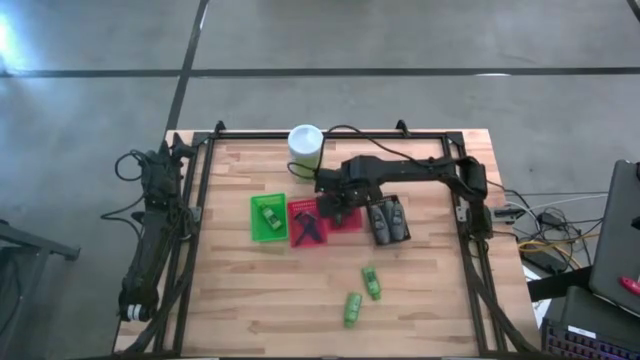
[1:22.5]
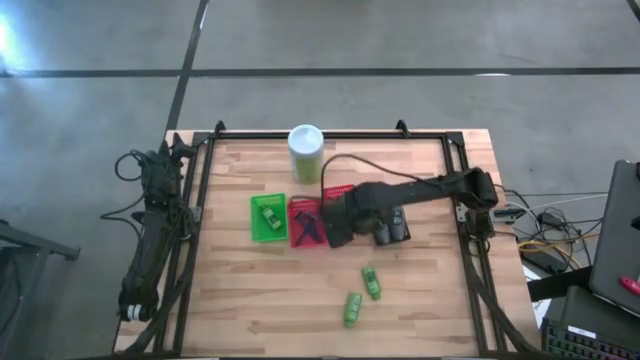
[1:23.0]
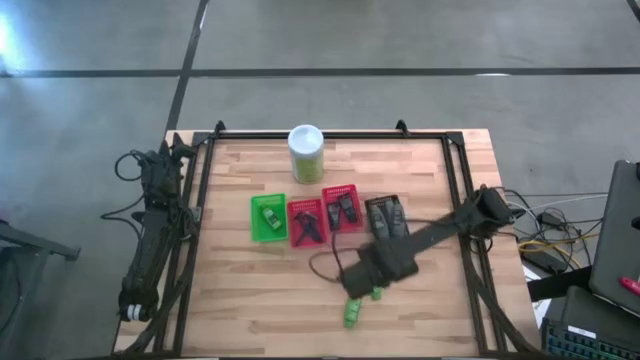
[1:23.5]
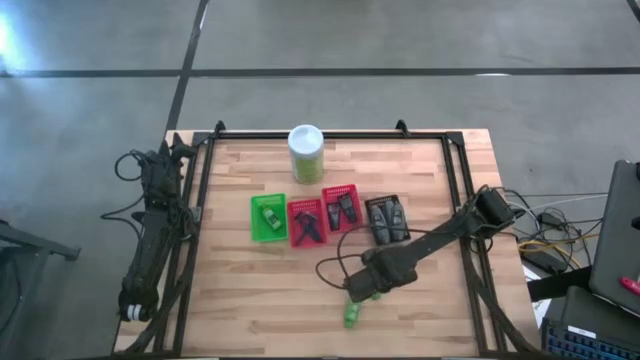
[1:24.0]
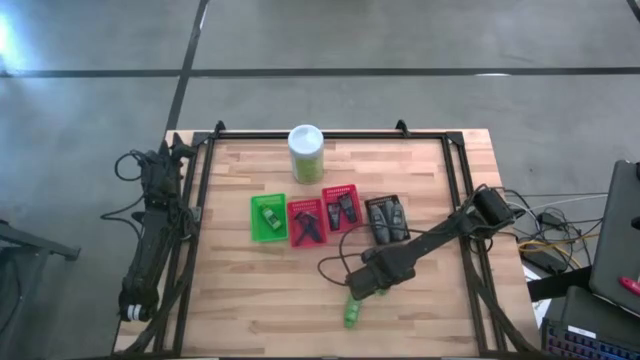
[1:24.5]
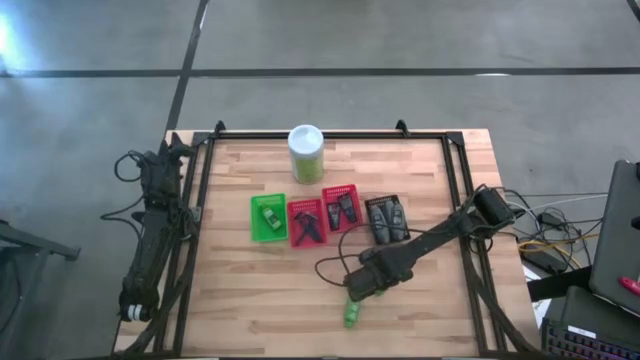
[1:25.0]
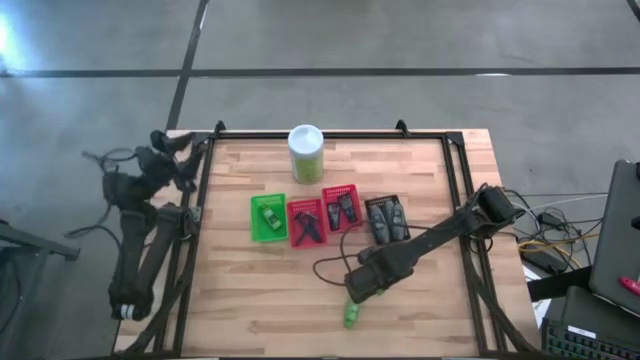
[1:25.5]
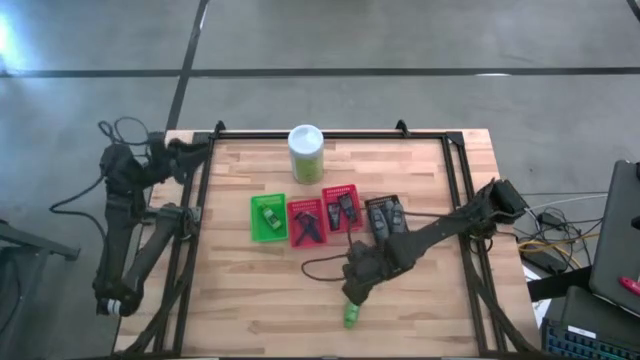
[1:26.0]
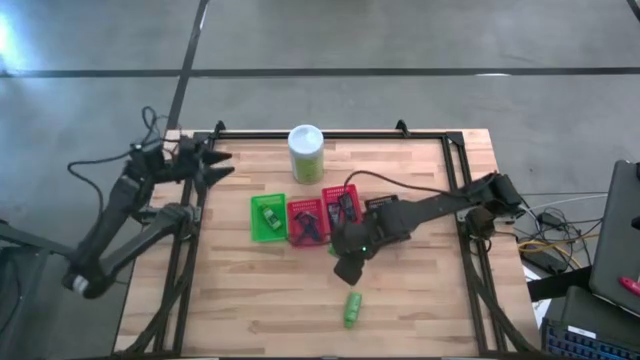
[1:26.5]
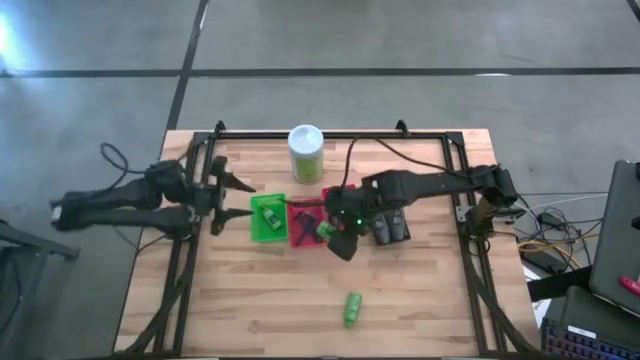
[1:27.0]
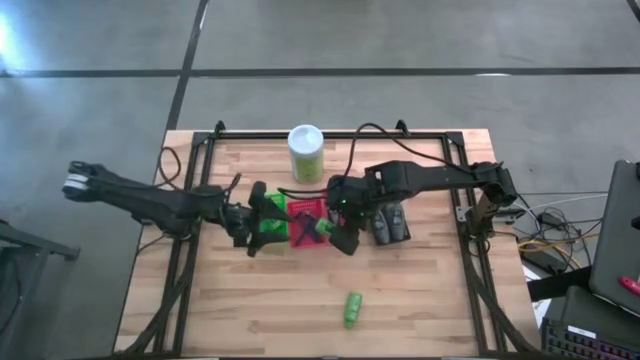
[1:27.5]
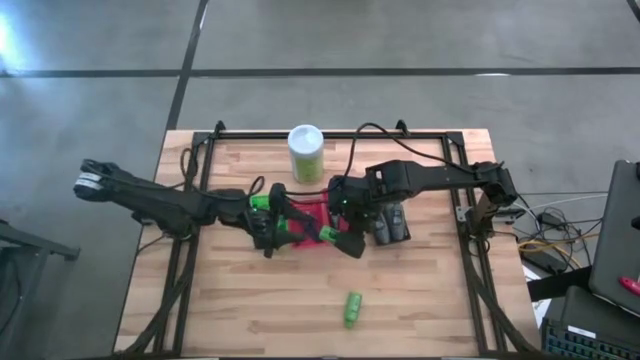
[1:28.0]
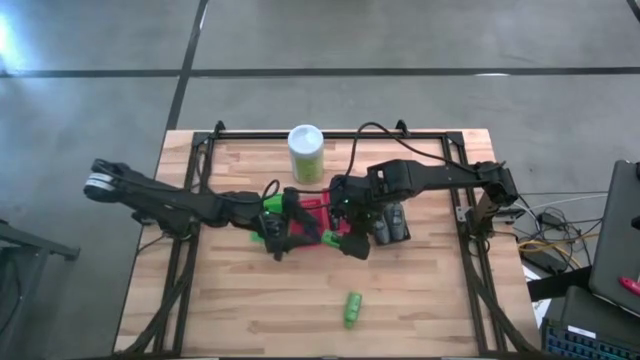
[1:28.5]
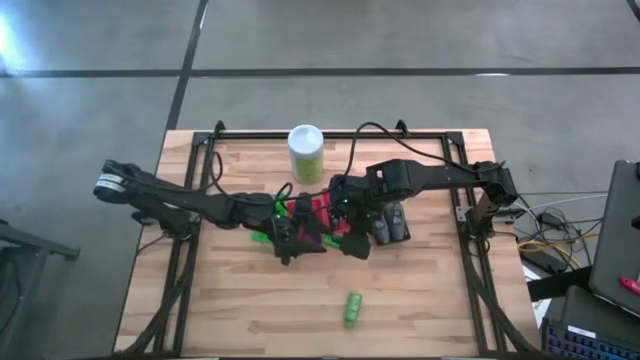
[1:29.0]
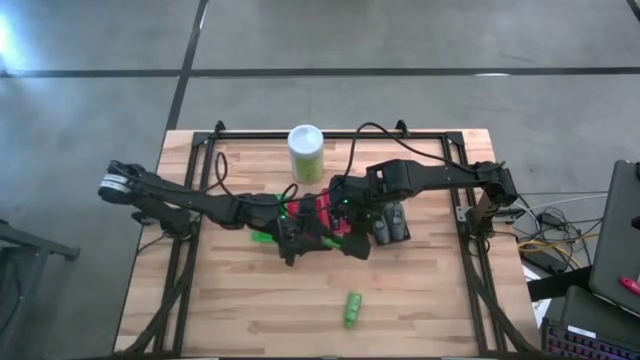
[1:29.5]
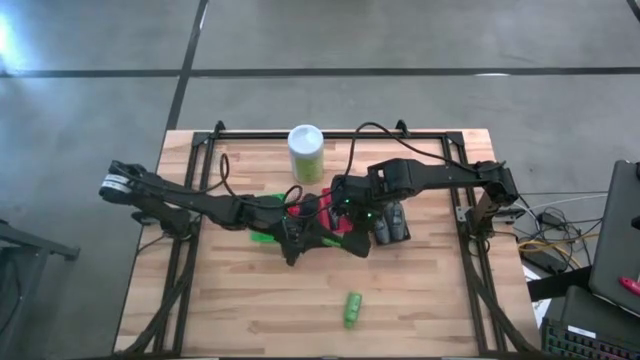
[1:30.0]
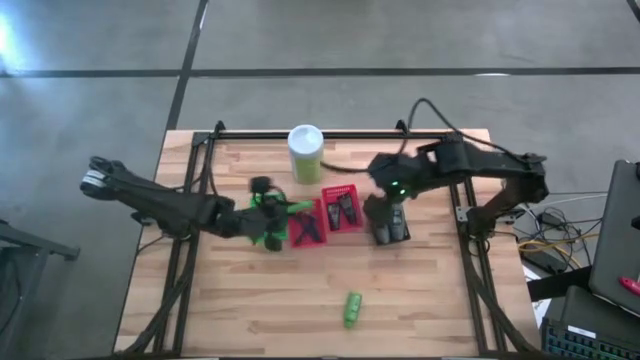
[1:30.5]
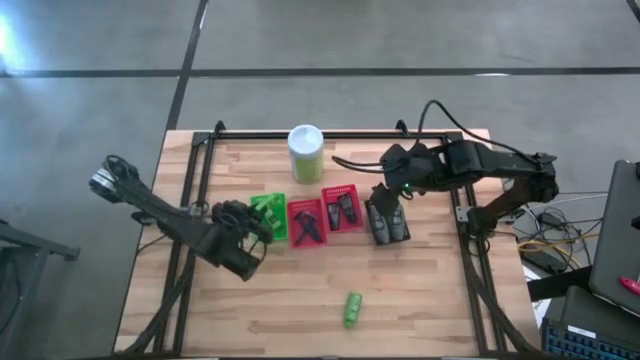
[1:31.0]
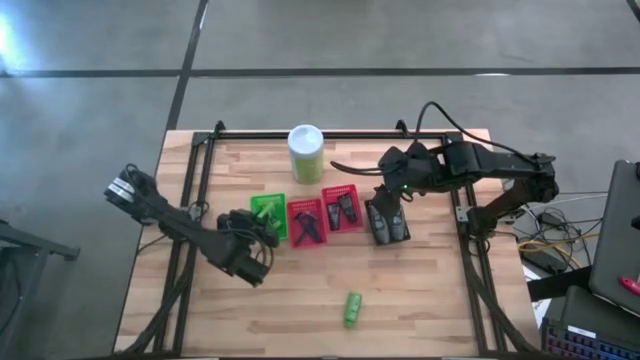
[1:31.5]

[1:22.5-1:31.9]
Task: Pick & Place Travel size toiletries
Put the green shampoo bottle into the green bin

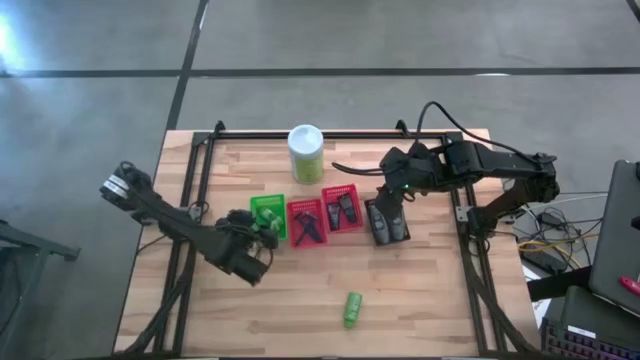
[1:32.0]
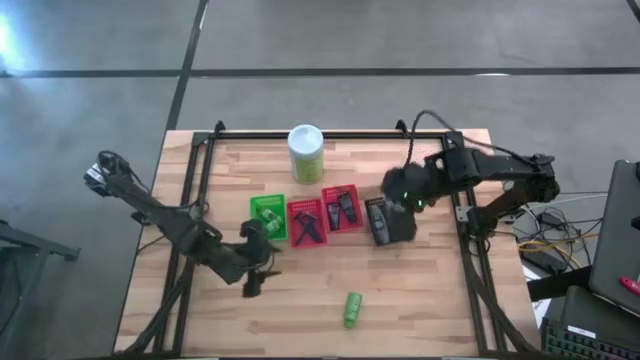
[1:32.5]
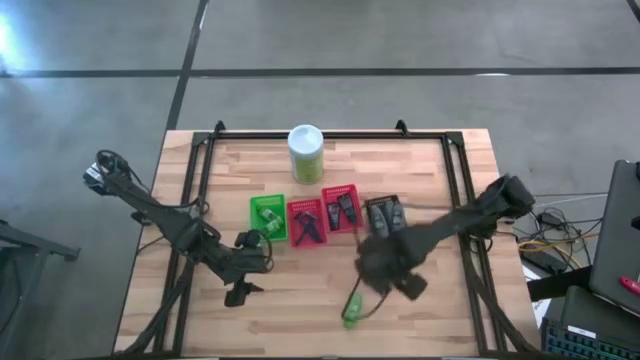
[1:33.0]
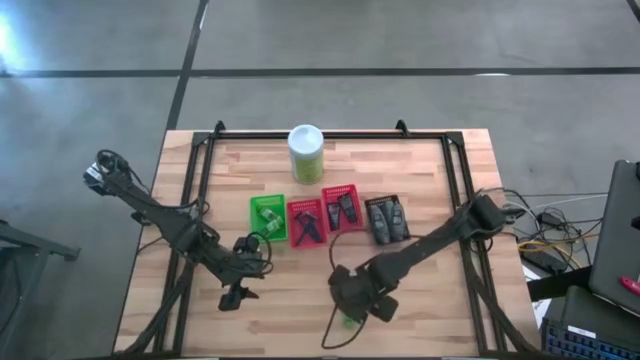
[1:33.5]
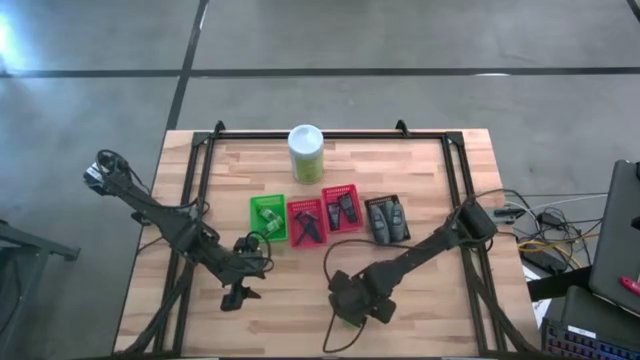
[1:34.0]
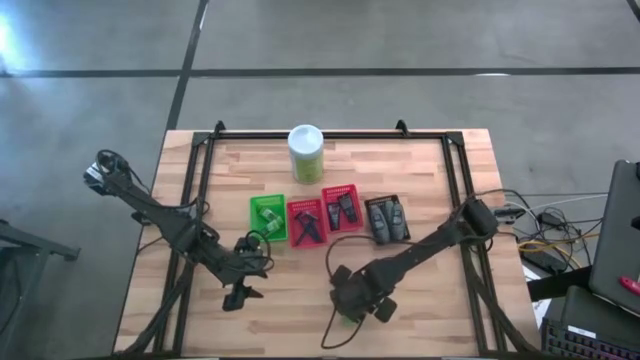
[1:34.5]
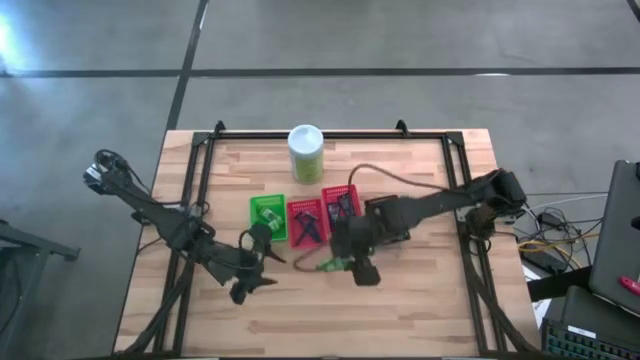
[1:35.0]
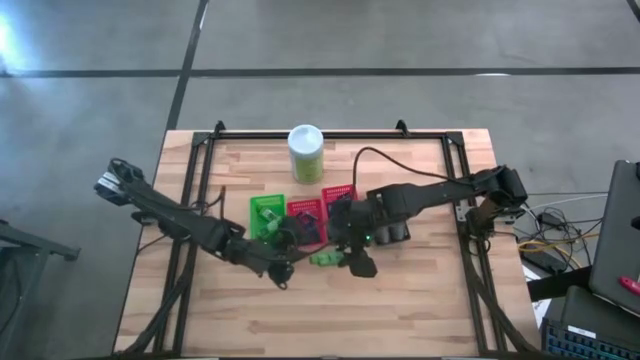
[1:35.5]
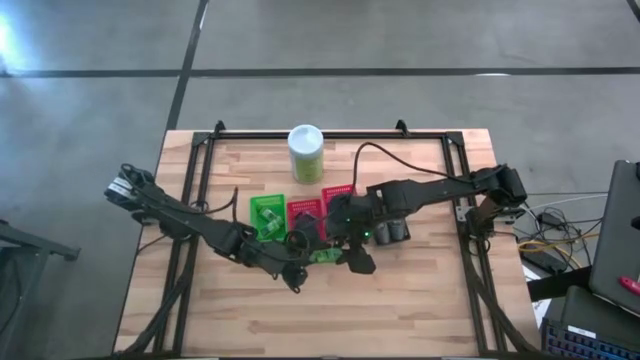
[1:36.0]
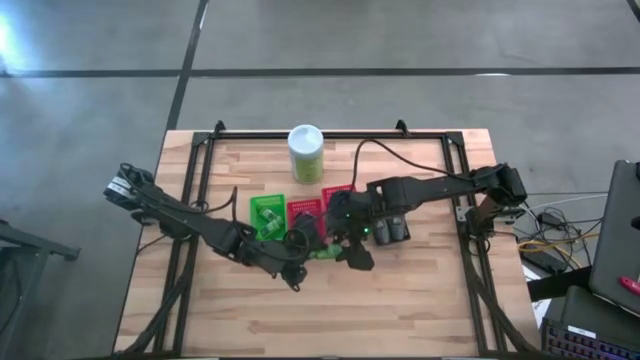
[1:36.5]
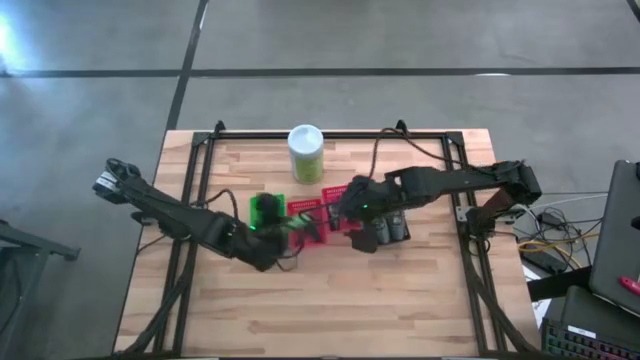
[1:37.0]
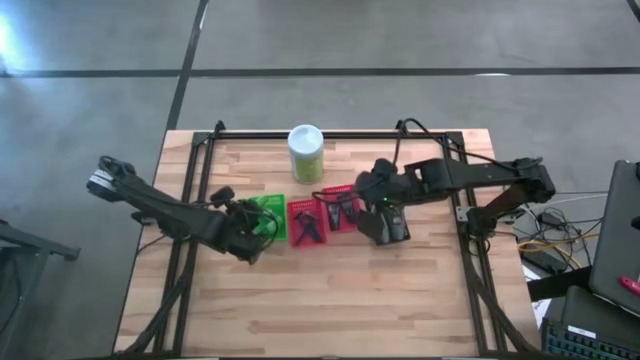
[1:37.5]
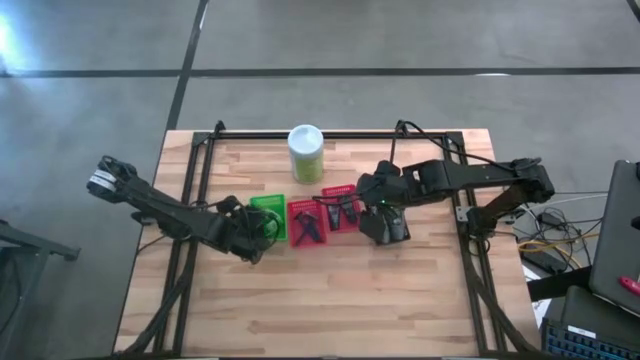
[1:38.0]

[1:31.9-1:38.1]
Put the green shampoo bottle into the green bin

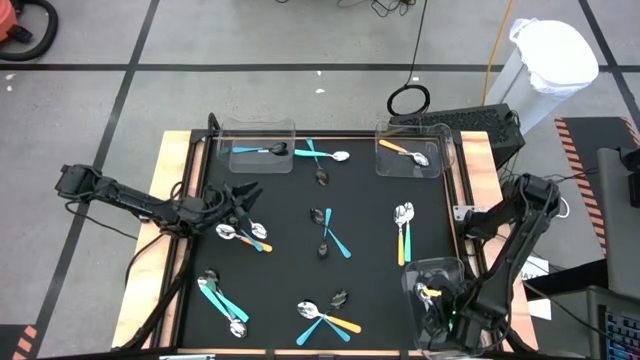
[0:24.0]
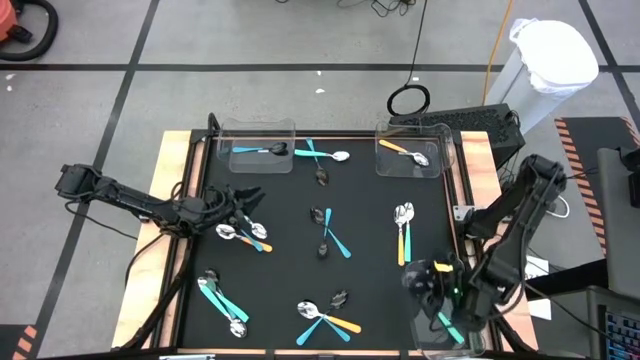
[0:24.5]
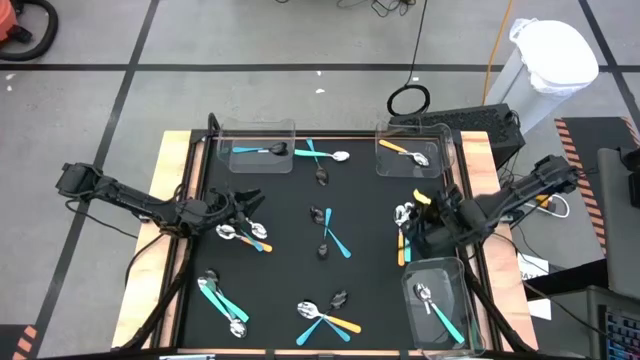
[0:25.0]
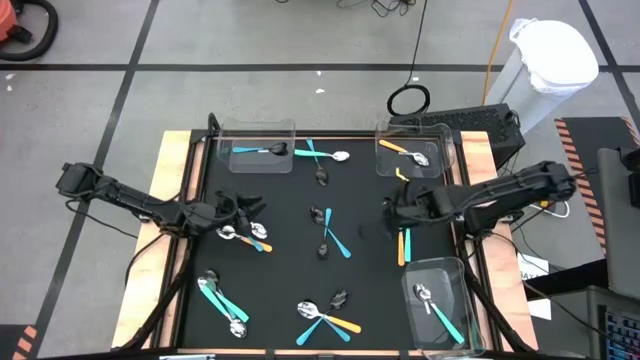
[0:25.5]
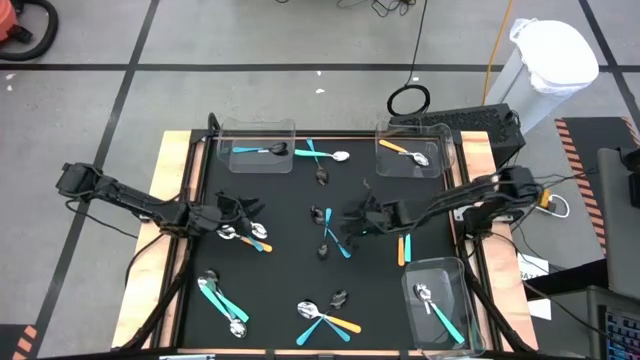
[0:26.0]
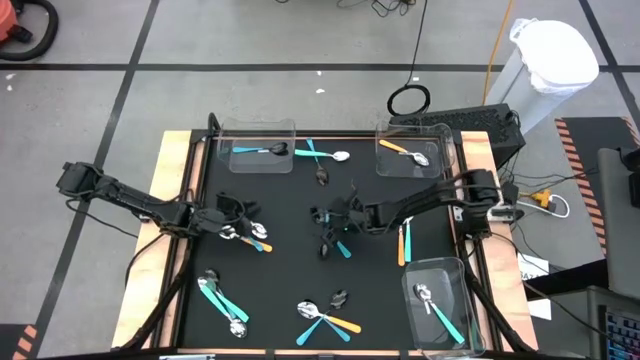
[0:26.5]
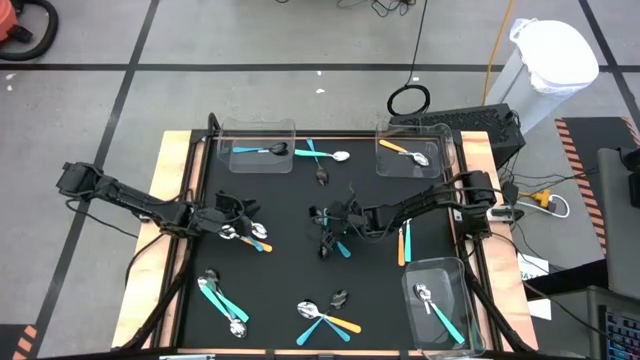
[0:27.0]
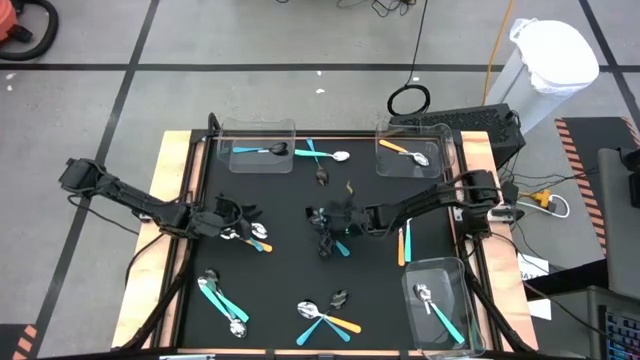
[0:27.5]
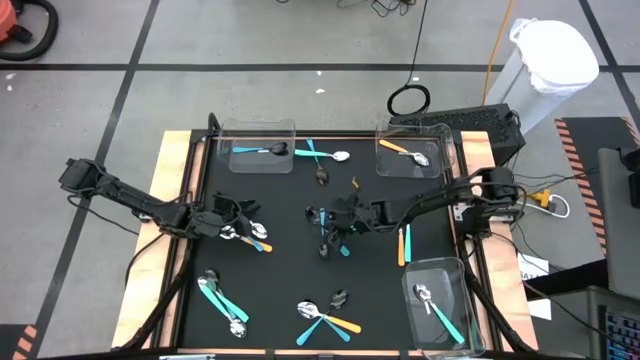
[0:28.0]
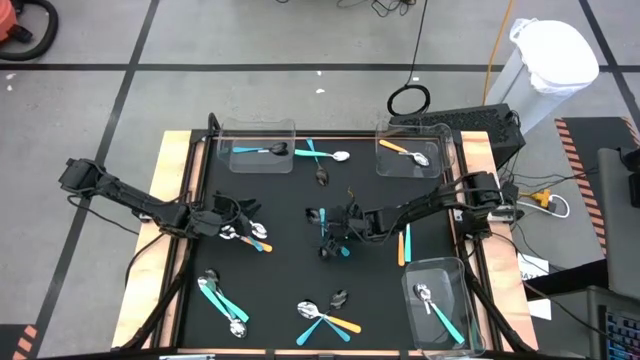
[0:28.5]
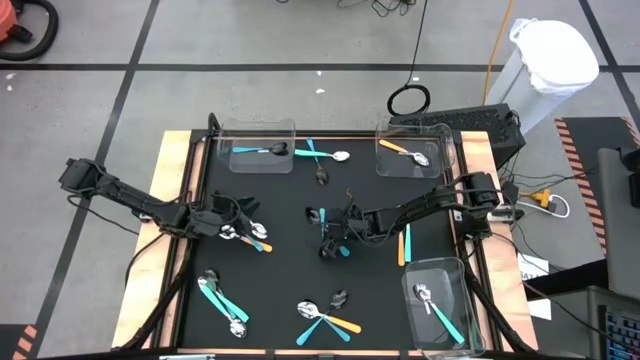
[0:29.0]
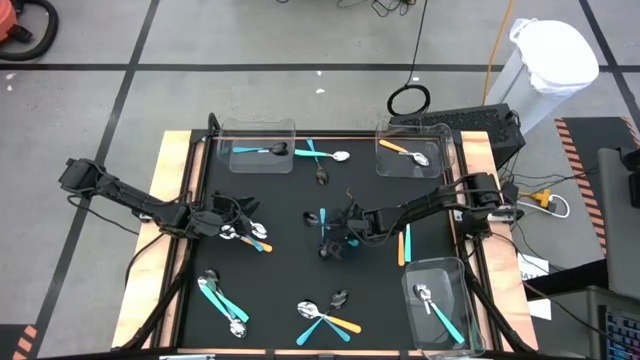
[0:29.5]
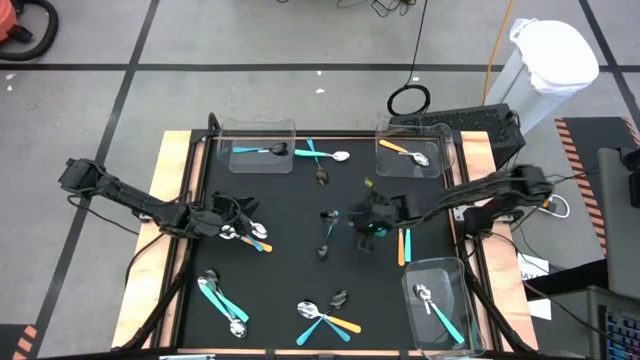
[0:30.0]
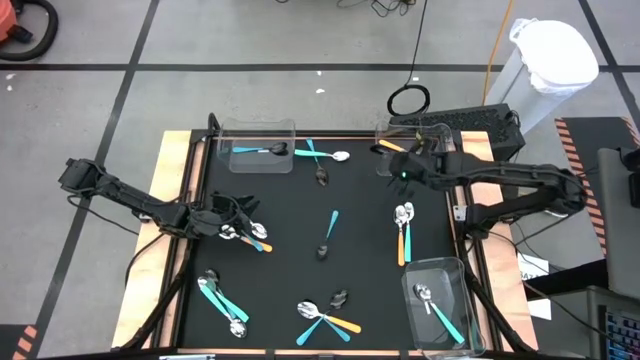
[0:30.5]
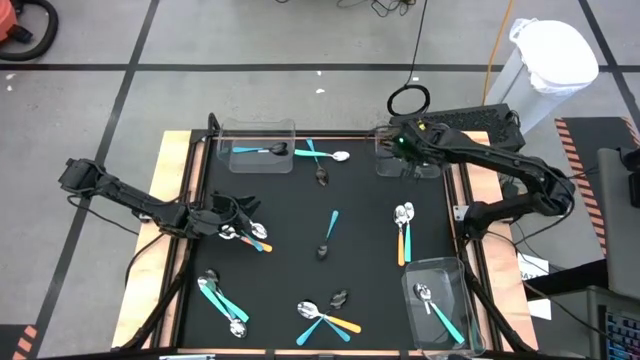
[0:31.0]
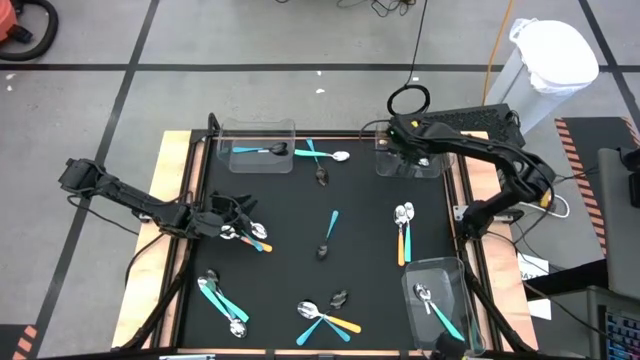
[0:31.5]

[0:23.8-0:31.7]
Task: Sort silverware by color (type)
Put the blue spoon into the top right transparent bin
